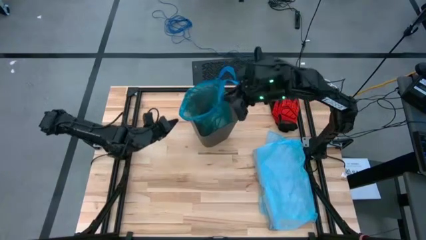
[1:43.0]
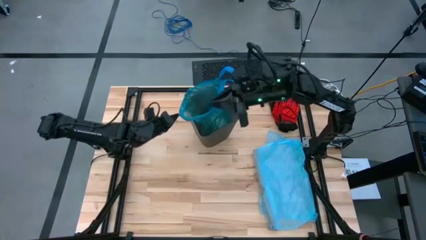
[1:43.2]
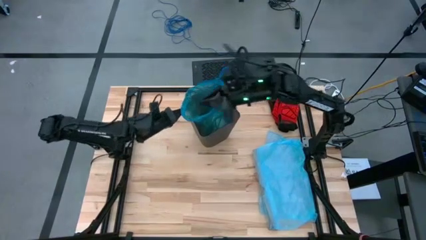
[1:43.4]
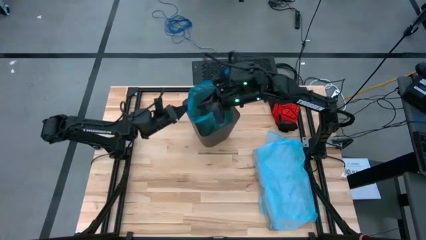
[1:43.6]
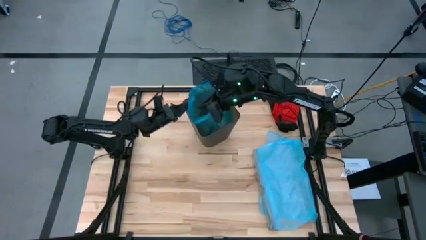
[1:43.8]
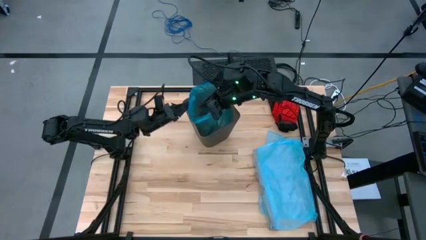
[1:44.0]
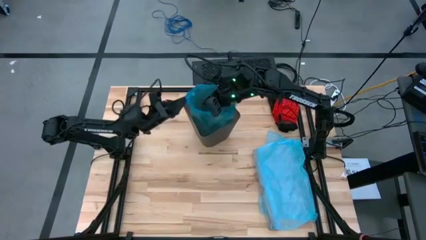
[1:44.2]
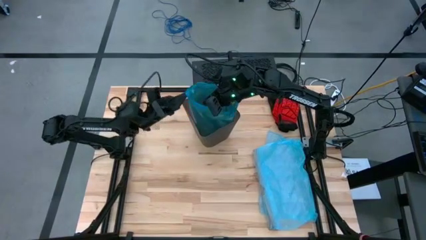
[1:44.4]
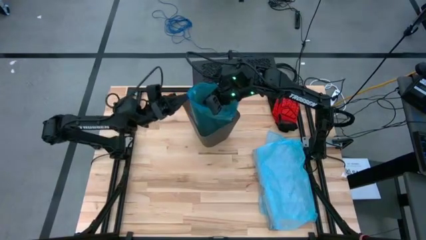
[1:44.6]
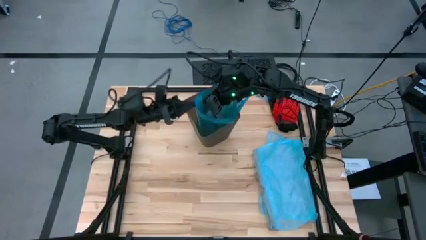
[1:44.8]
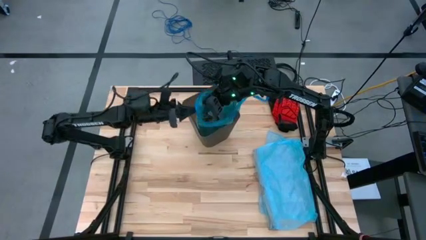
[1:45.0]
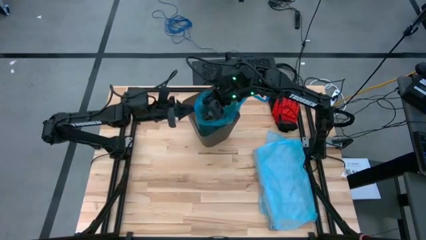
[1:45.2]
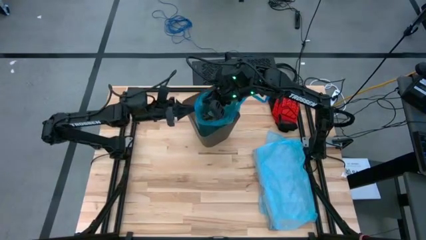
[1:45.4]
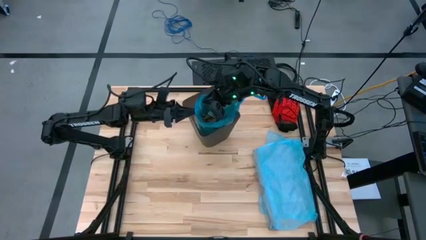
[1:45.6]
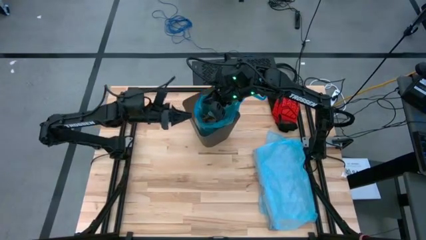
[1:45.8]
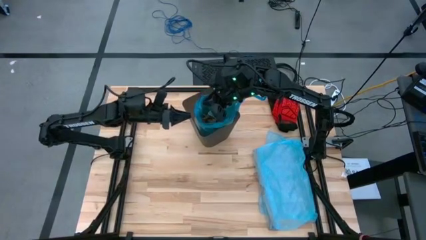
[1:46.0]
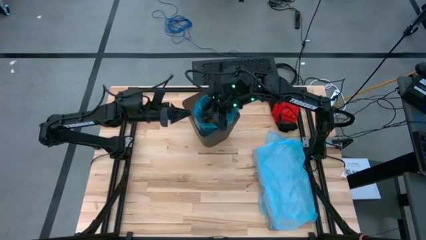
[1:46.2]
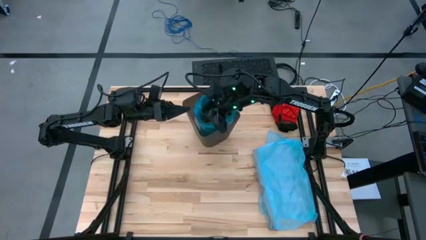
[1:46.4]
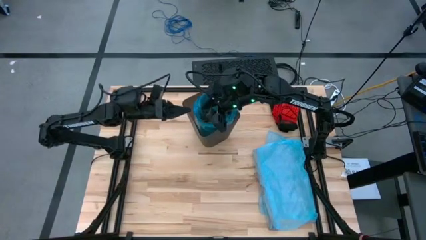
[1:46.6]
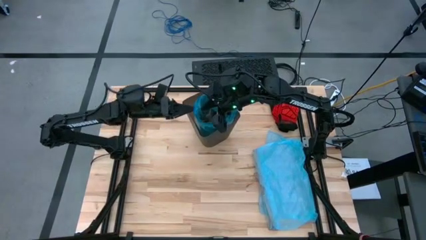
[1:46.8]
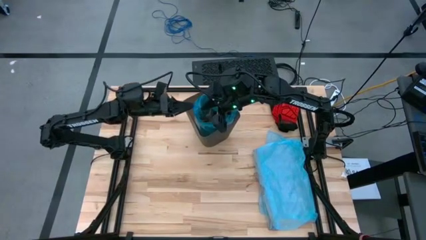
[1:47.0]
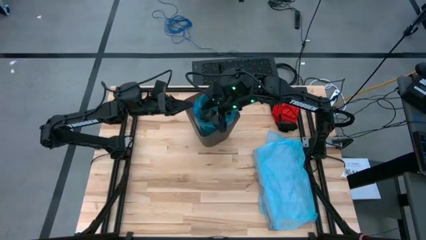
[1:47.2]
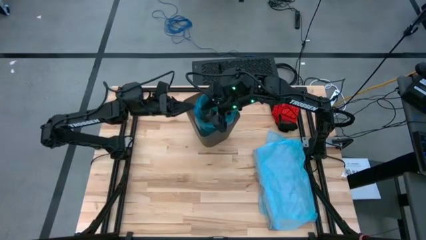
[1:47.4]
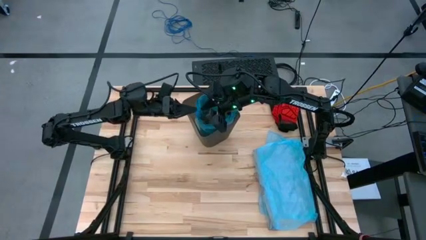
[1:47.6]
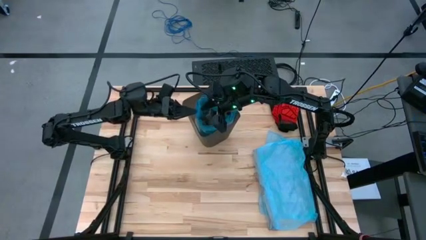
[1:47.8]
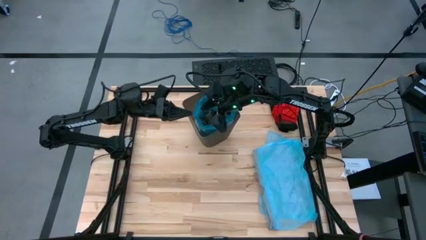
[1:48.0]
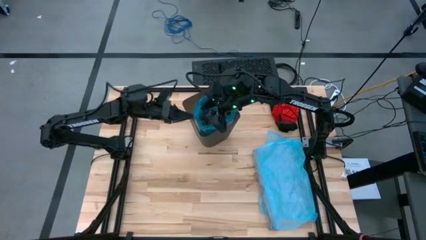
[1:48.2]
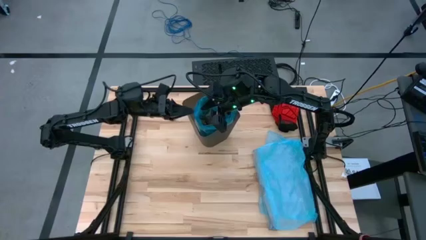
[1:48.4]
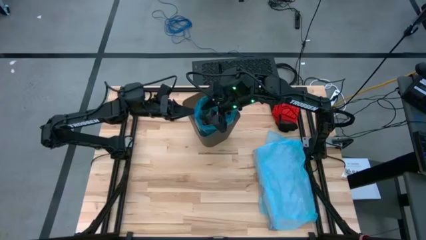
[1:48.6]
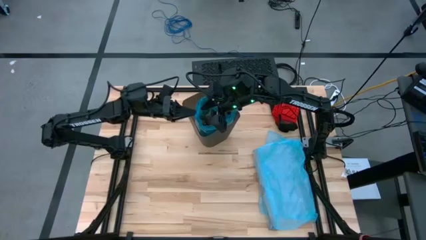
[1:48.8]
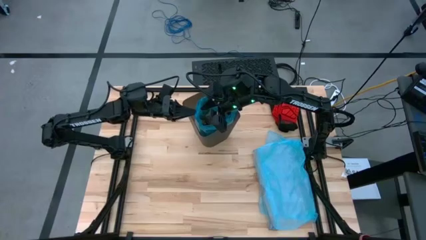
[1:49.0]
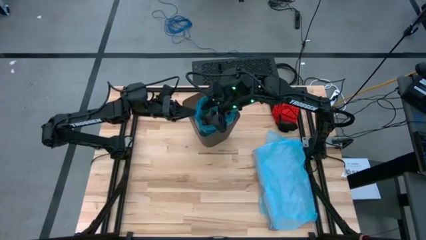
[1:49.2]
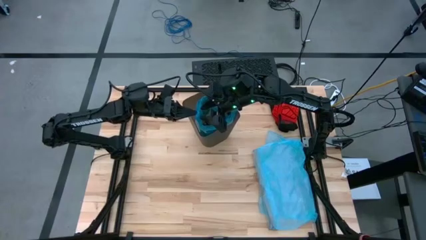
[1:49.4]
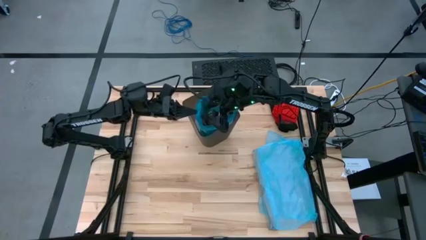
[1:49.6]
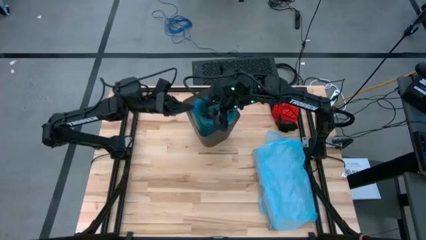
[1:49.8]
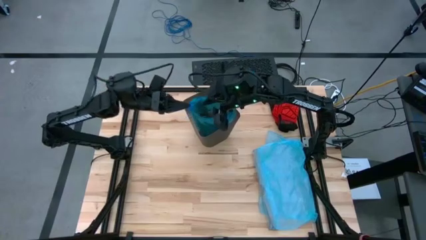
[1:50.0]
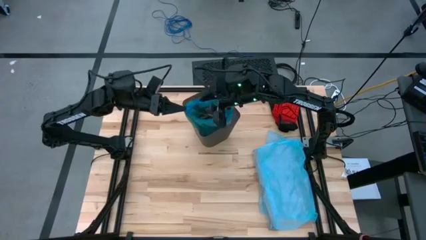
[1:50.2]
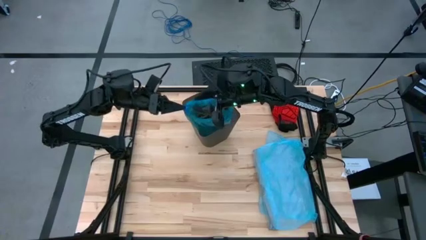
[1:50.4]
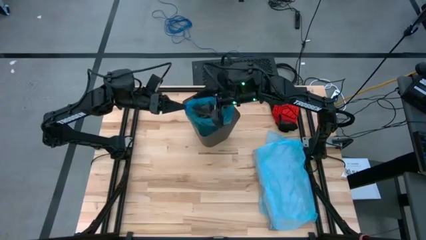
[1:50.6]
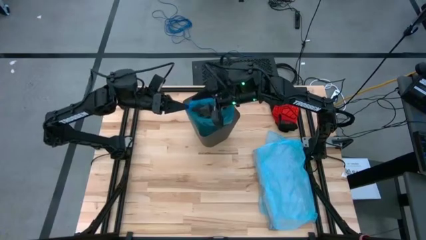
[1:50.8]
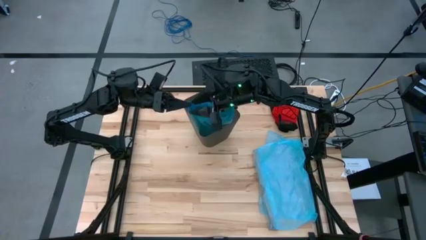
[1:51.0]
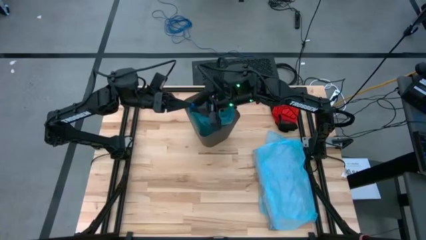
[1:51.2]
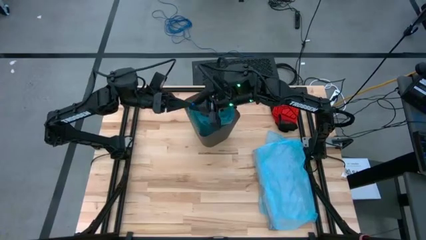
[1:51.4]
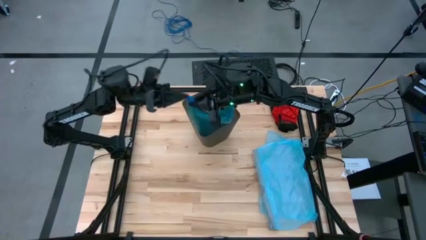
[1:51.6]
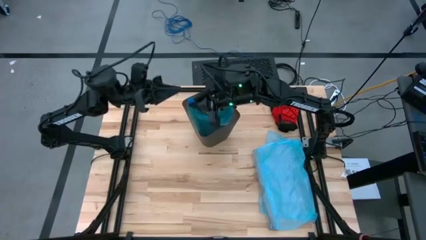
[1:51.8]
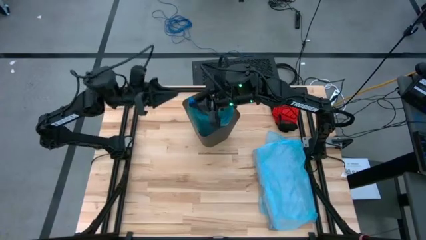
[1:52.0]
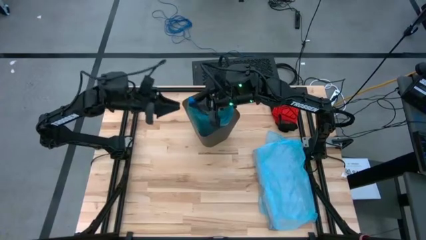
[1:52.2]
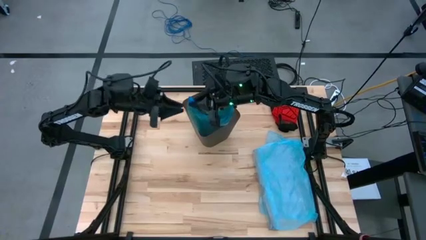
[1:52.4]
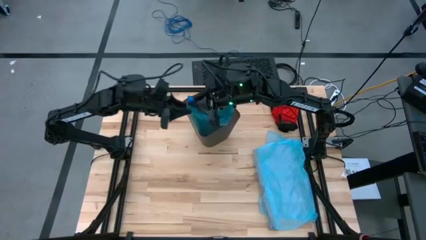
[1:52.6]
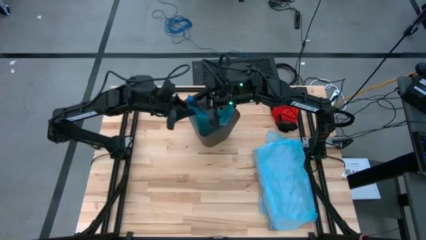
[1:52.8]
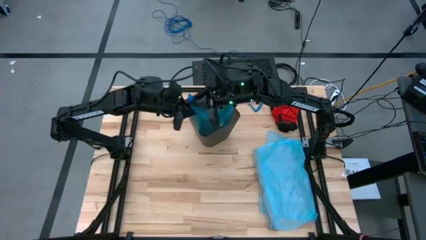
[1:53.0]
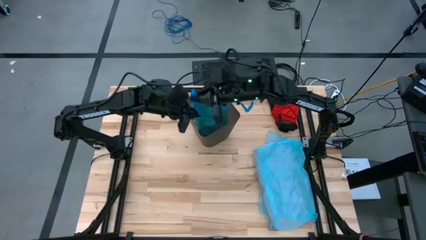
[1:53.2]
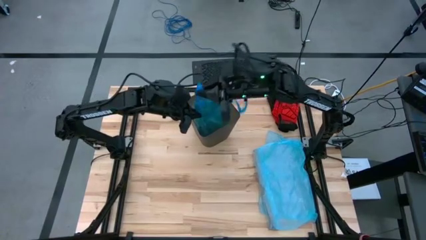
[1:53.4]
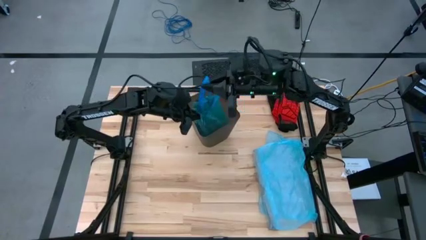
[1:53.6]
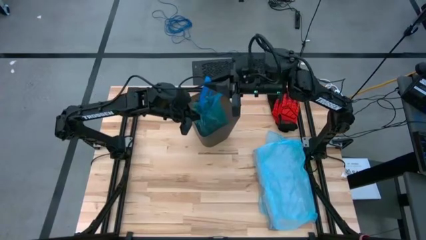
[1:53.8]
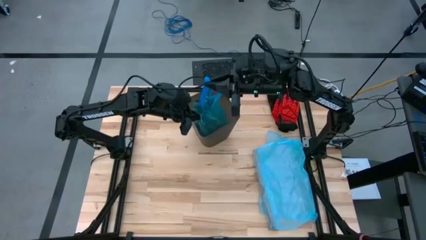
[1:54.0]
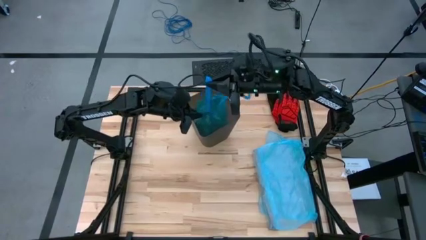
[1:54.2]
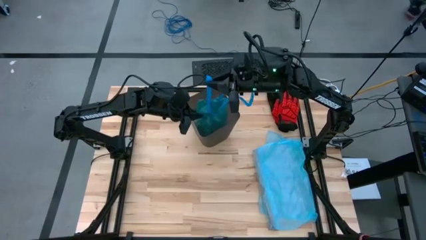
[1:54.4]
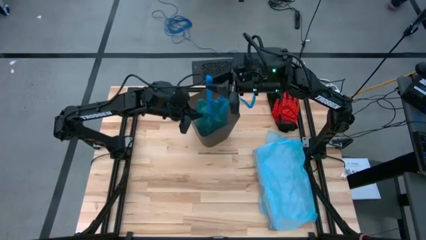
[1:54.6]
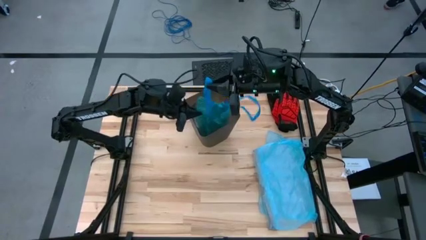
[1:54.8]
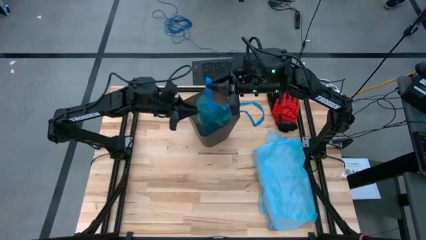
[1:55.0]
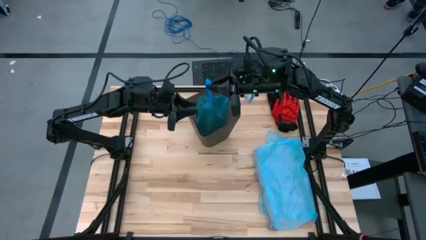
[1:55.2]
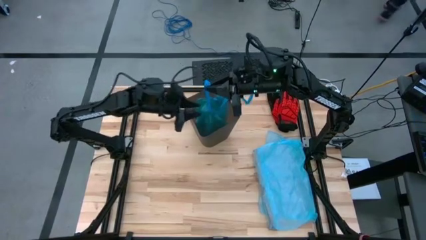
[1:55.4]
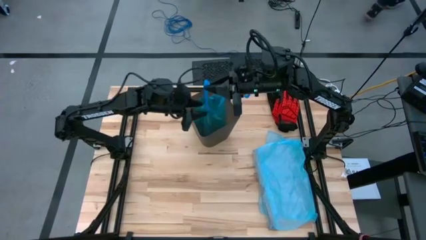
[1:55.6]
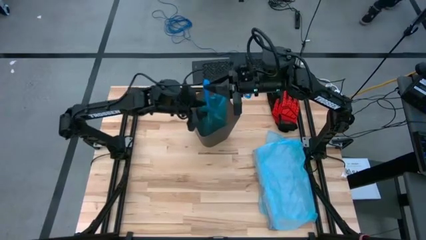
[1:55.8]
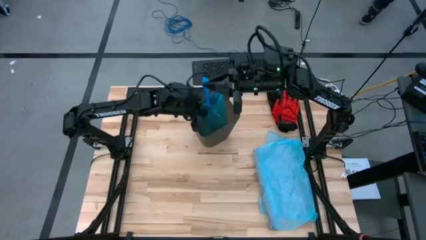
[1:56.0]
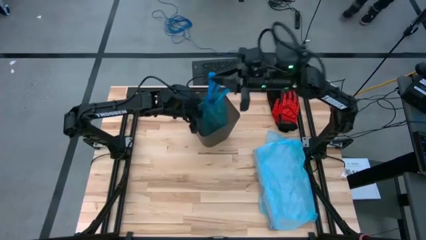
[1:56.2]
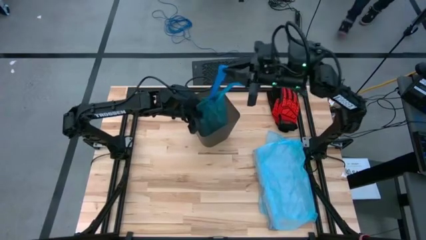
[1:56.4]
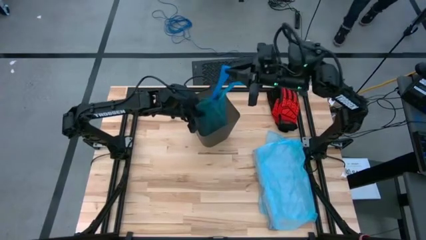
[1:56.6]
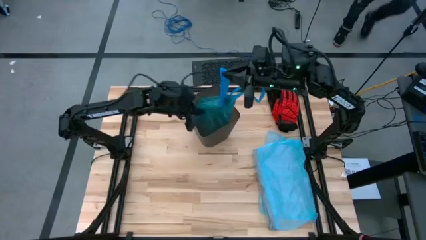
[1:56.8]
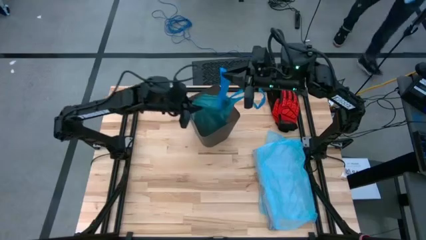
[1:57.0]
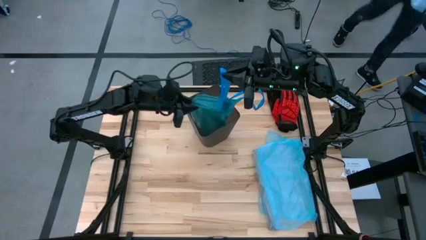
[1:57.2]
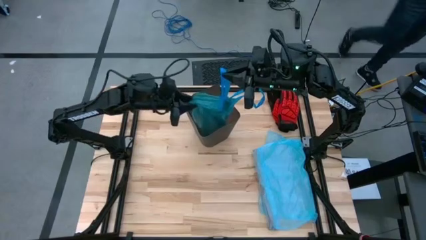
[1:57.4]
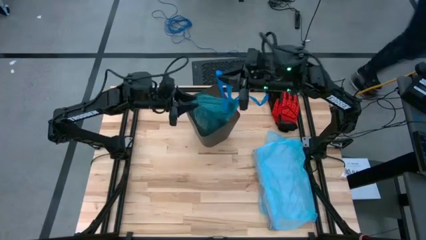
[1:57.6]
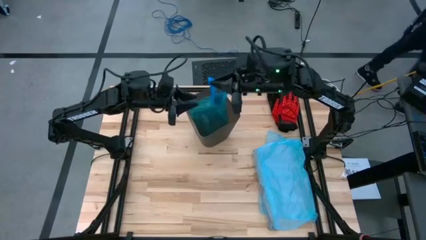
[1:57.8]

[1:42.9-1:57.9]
Task: place trash/remove bag and relplace
Close the blue trash bag in the trash bin

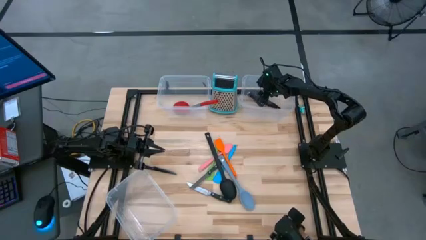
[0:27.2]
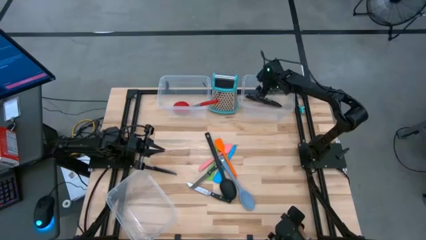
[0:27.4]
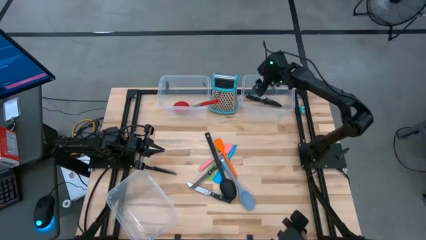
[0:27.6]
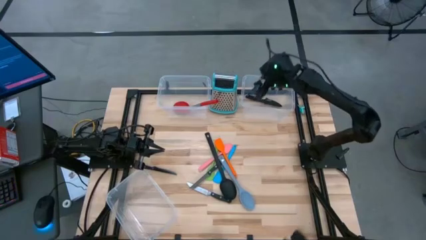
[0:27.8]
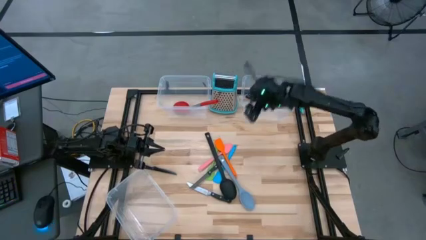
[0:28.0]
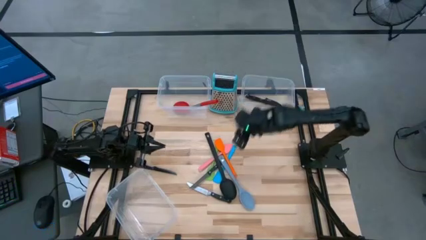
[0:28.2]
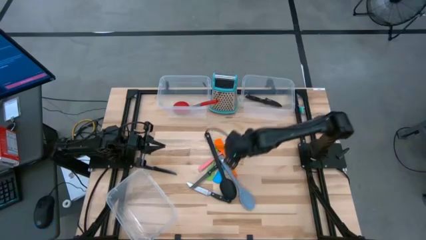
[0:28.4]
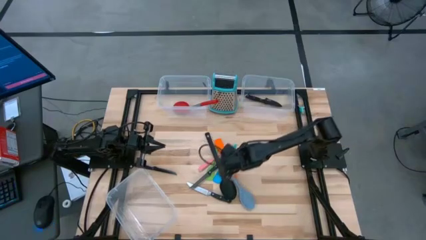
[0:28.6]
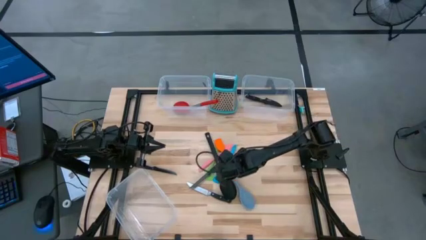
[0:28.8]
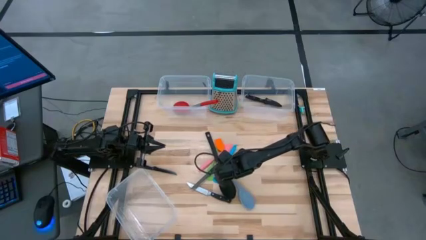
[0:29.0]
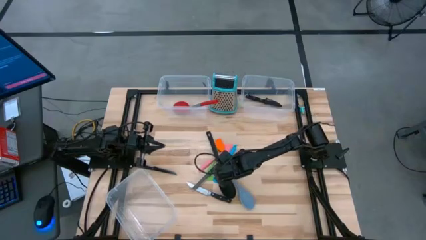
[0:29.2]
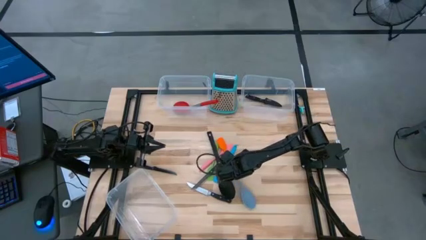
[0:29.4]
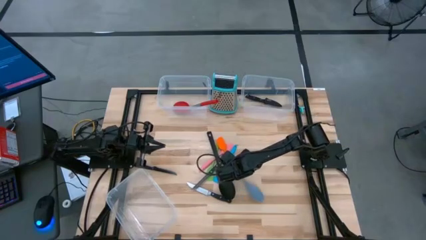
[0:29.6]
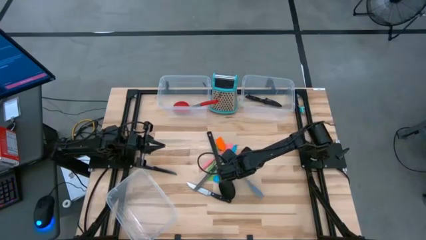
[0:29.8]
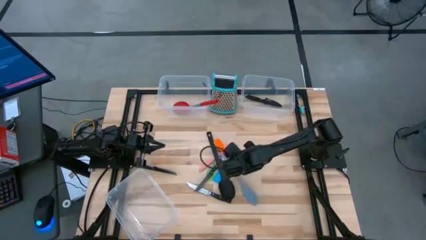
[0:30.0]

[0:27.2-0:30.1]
Task: Pick & Place Kitchen Items
Put the grey serving spoon into the bottom left transparent bin
